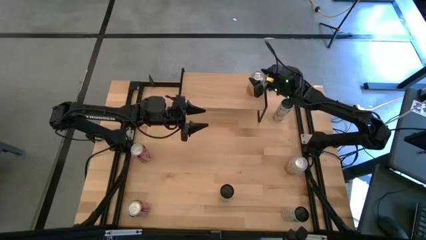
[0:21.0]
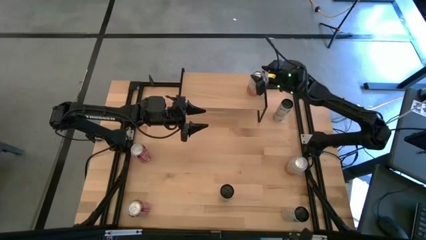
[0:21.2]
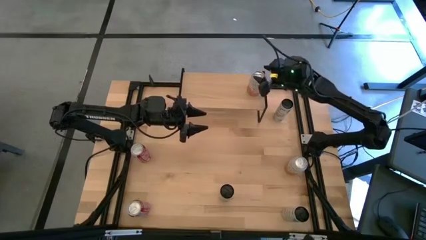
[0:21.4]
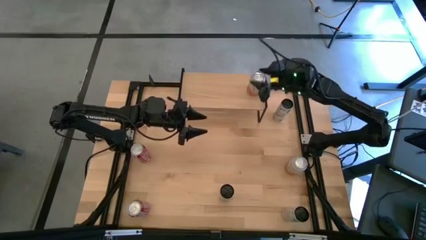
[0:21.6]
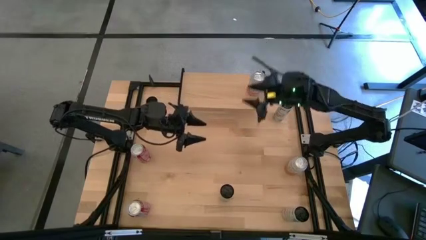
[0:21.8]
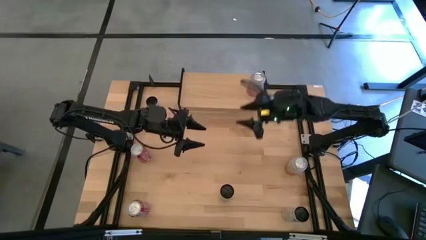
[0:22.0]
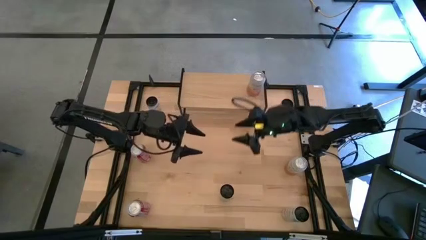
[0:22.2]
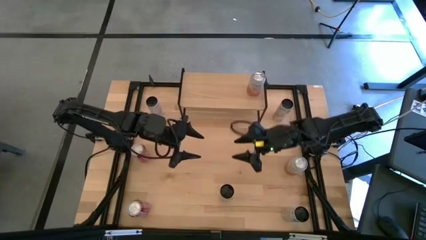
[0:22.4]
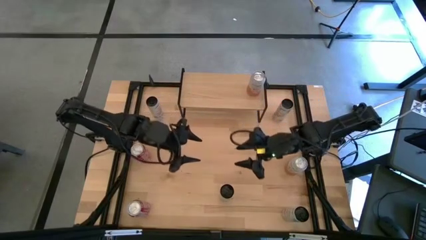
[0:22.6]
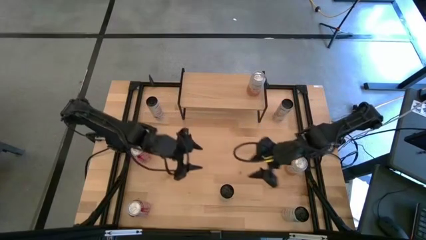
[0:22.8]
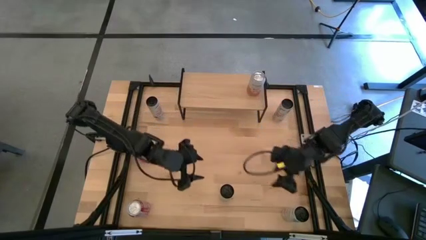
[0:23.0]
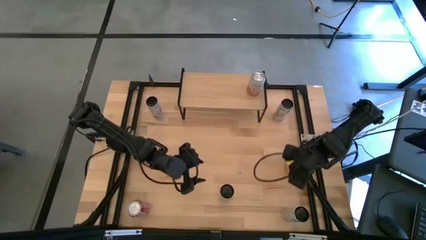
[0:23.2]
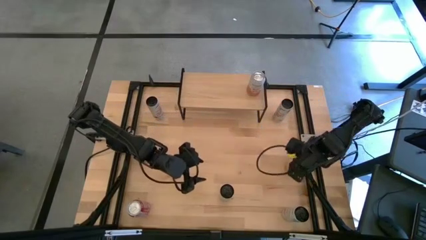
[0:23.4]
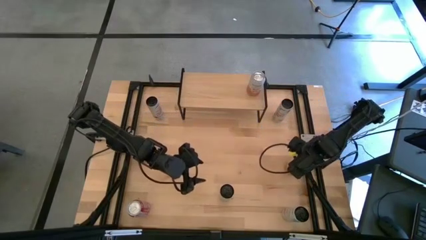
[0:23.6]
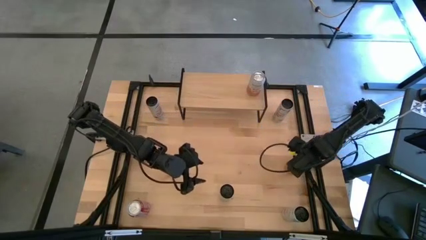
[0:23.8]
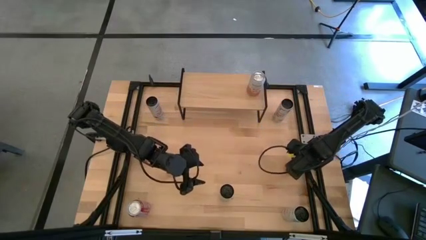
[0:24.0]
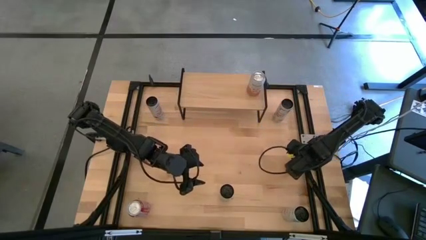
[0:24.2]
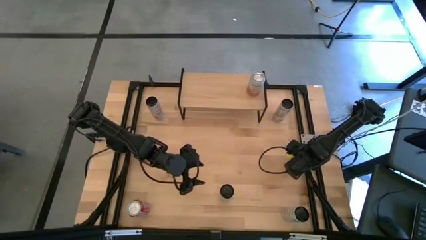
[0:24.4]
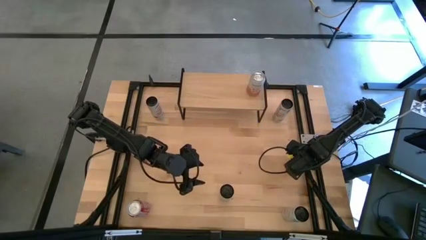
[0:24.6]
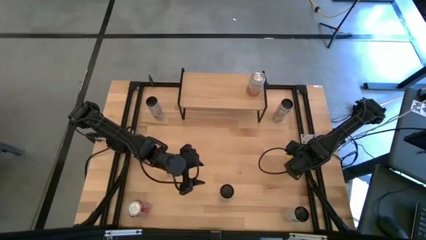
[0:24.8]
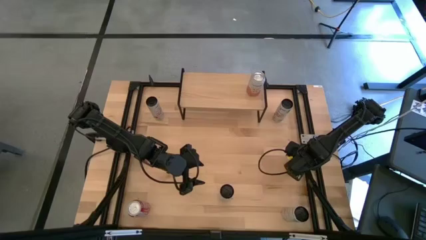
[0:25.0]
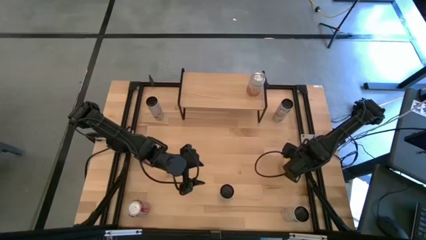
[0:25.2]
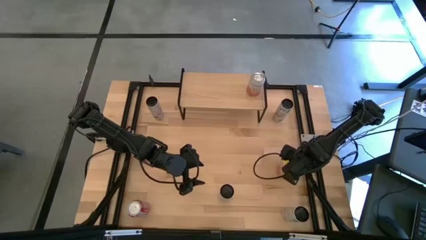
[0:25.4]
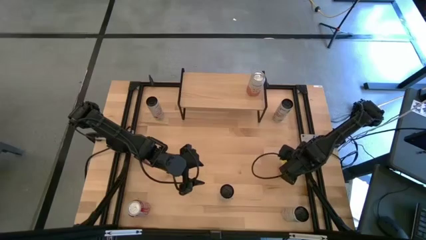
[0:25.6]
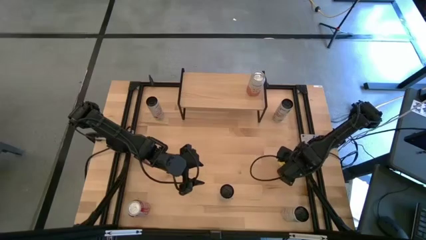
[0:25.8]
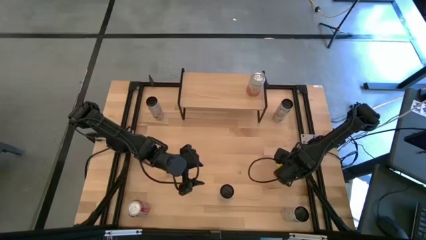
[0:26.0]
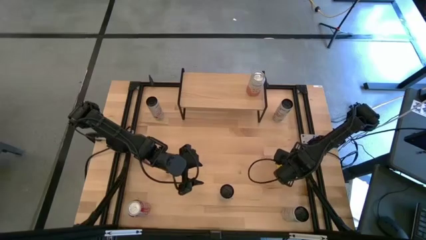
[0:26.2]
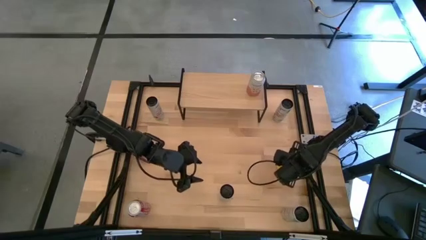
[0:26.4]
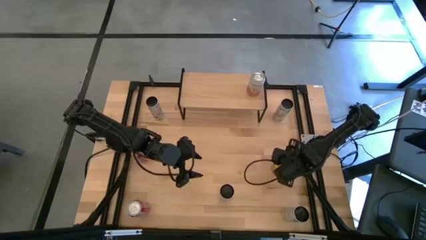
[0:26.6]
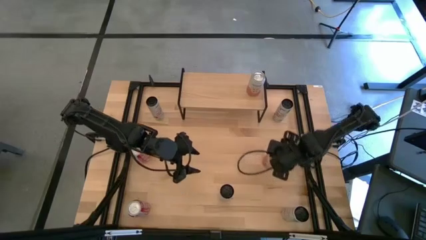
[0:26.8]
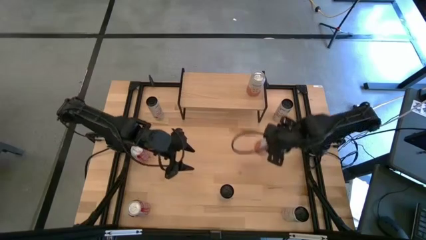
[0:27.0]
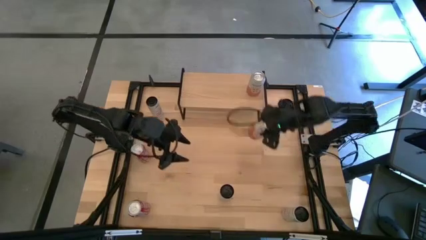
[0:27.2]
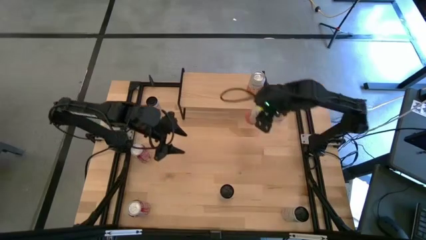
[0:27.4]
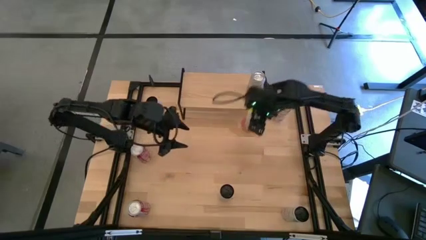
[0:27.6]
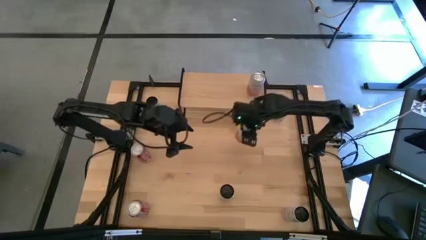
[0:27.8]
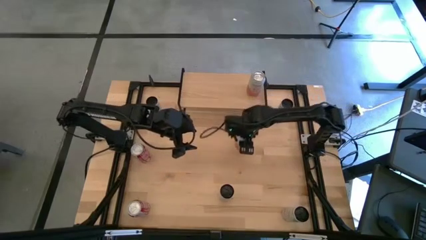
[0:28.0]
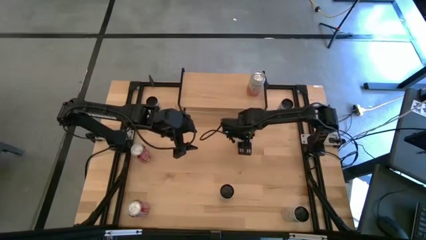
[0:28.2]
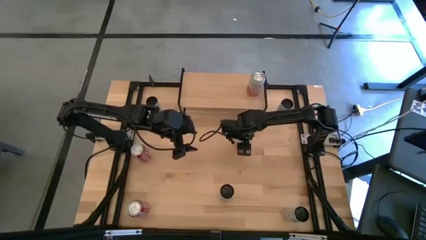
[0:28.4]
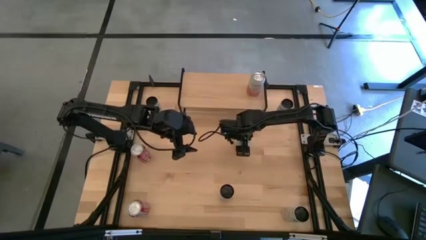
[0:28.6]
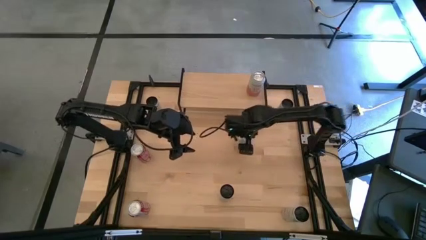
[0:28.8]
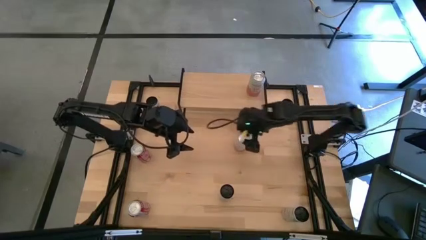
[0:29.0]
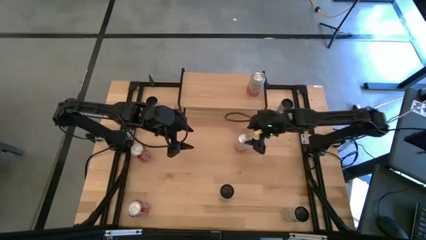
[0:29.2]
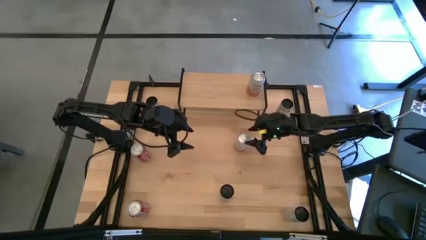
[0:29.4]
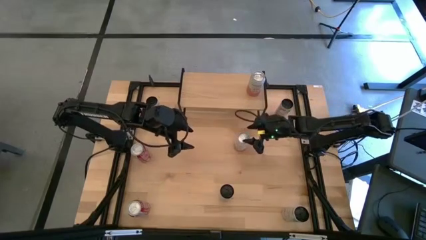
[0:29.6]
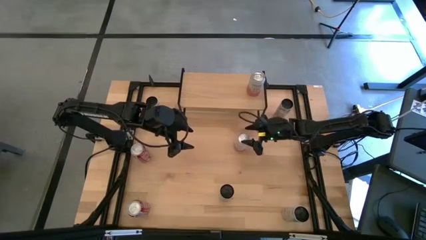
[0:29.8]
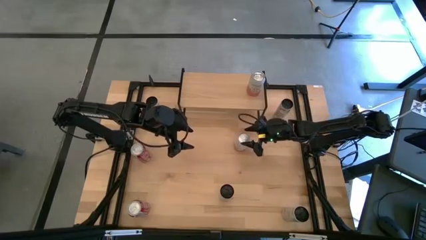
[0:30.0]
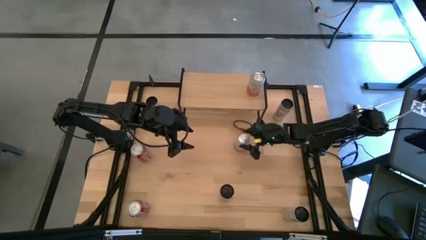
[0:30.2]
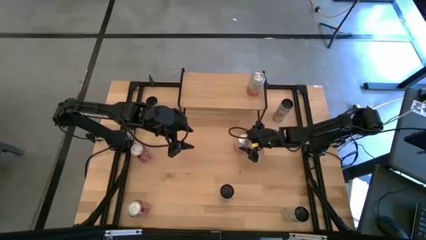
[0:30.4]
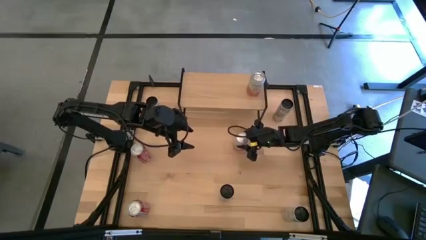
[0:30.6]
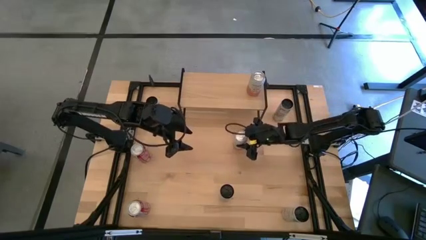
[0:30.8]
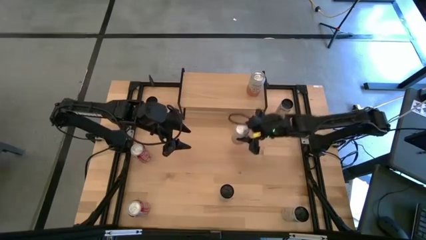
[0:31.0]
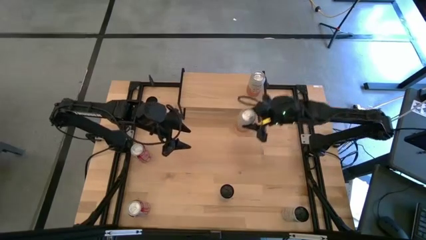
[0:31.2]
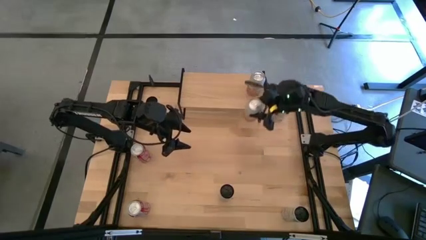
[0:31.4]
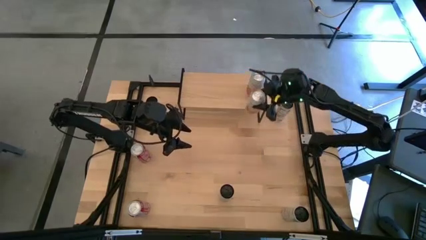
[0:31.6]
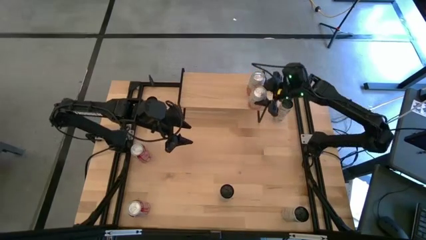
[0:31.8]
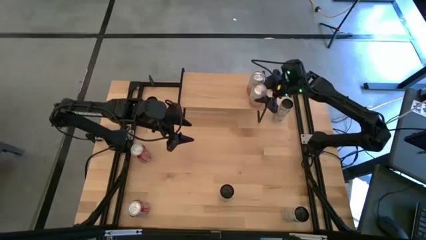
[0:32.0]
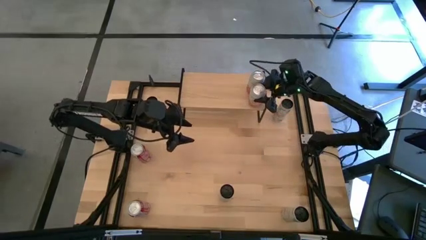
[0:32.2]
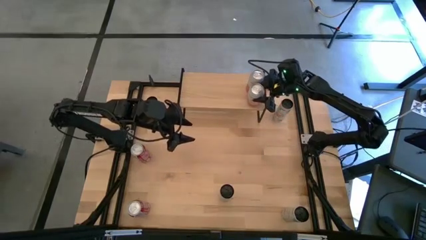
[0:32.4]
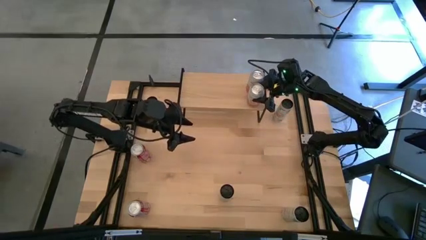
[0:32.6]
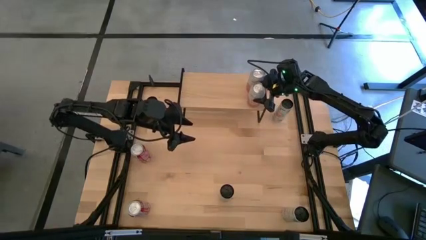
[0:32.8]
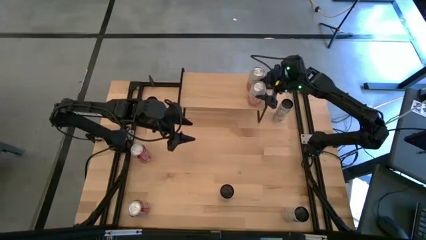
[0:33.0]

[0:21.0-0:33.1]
Task: Place canned beverage on shelf
Put the orange white soda can aligned with the other orange white soda can on the shelf

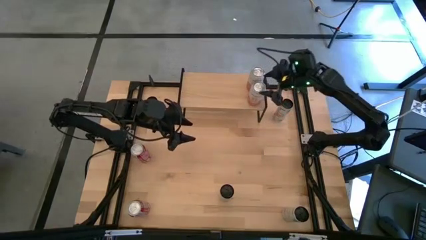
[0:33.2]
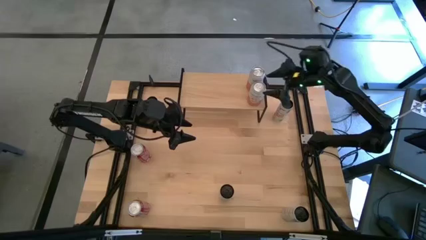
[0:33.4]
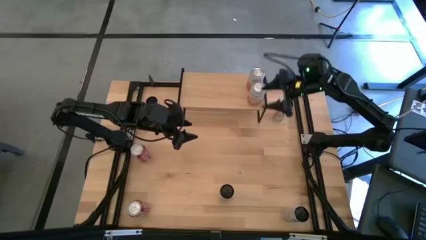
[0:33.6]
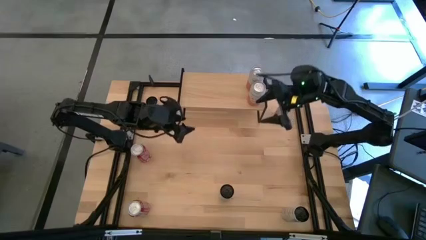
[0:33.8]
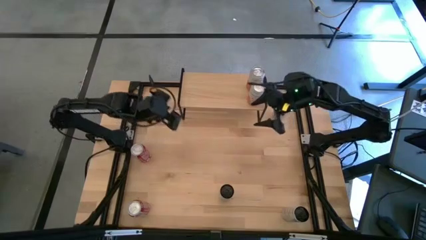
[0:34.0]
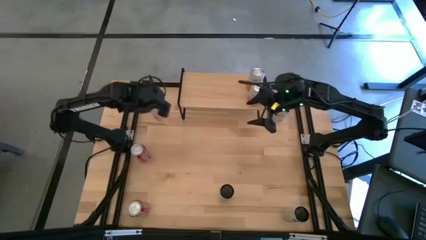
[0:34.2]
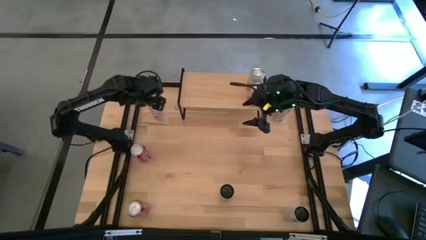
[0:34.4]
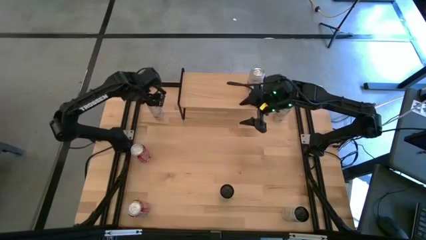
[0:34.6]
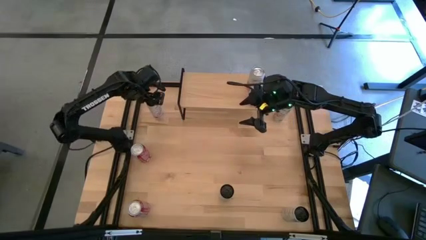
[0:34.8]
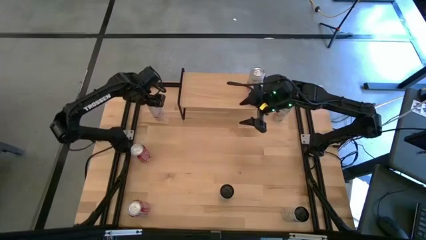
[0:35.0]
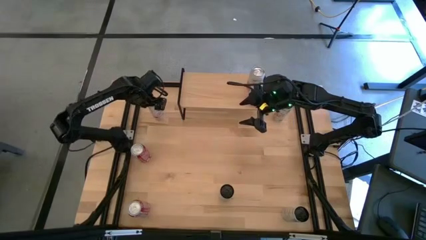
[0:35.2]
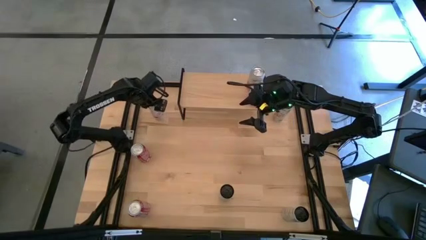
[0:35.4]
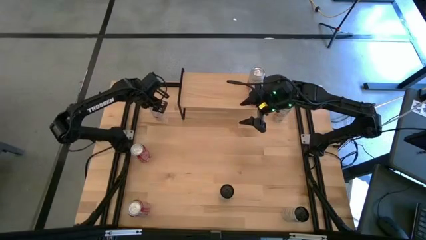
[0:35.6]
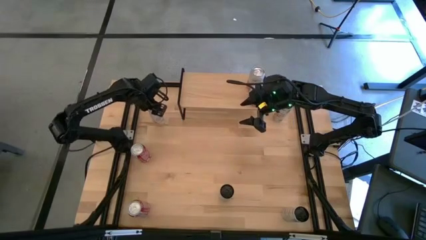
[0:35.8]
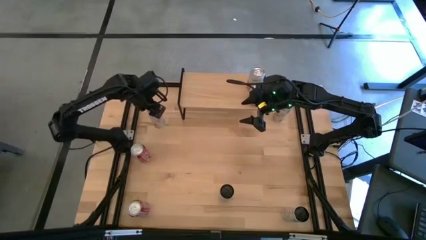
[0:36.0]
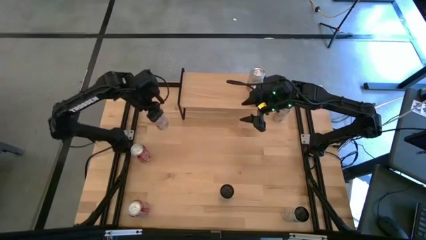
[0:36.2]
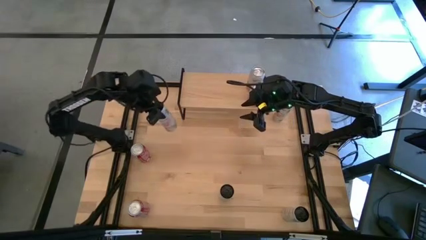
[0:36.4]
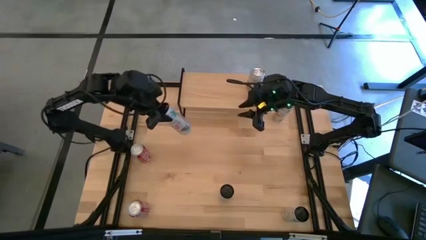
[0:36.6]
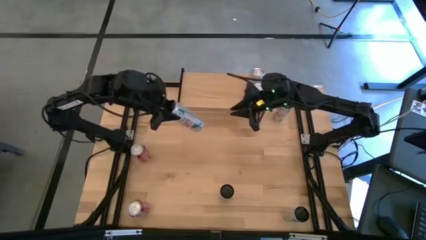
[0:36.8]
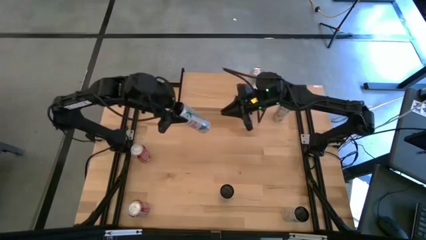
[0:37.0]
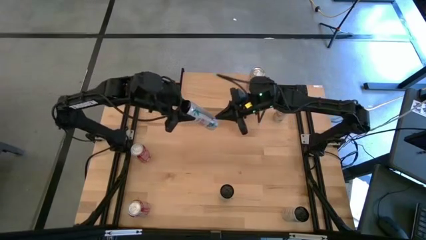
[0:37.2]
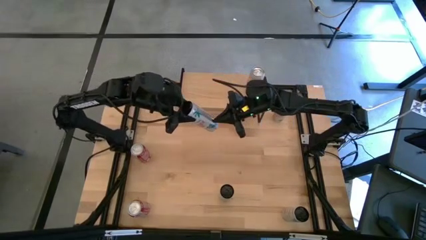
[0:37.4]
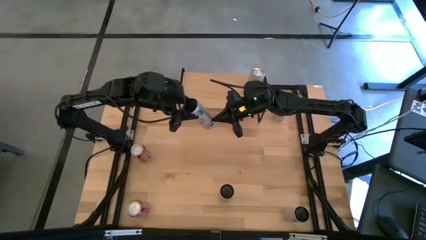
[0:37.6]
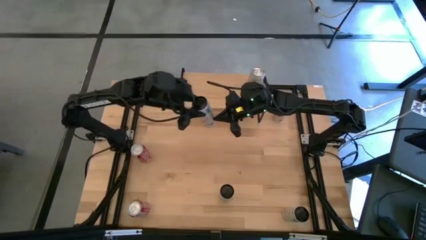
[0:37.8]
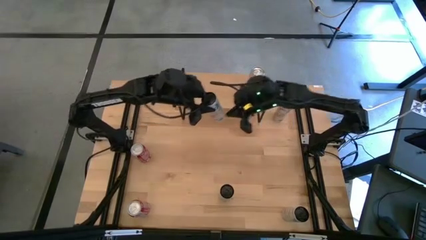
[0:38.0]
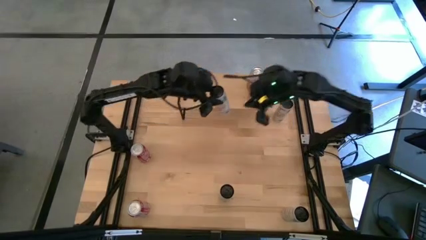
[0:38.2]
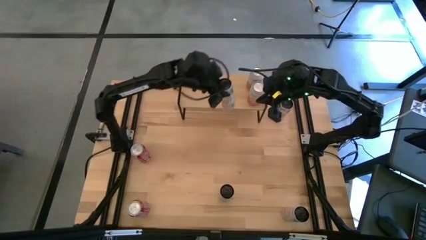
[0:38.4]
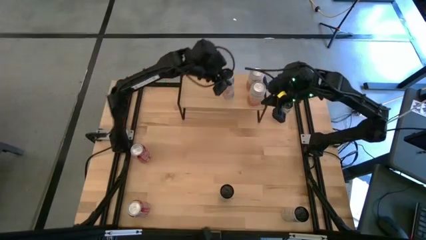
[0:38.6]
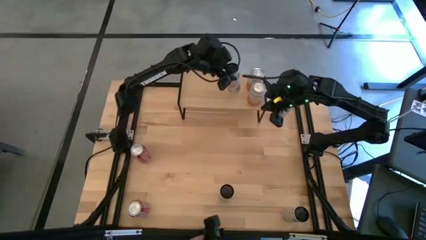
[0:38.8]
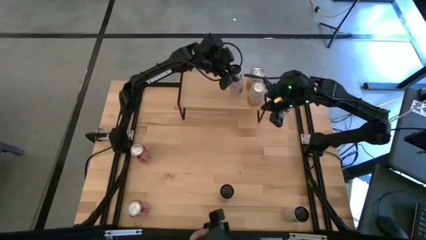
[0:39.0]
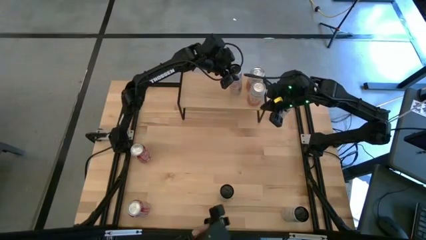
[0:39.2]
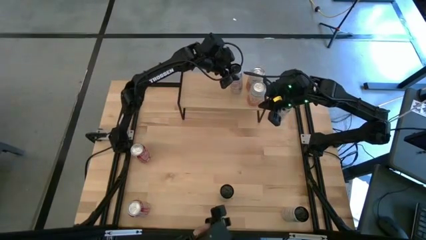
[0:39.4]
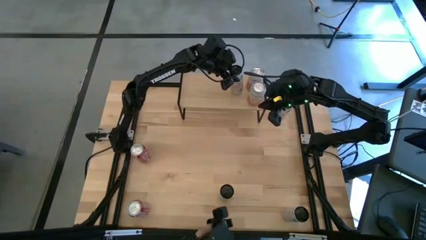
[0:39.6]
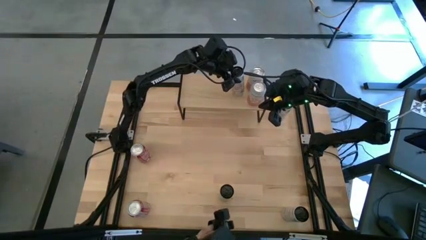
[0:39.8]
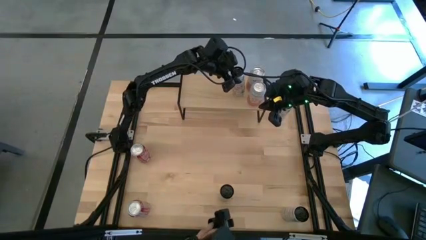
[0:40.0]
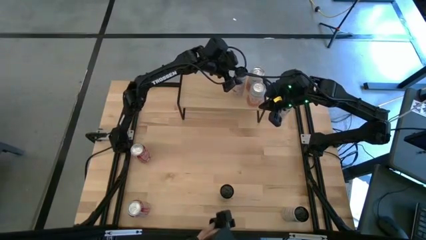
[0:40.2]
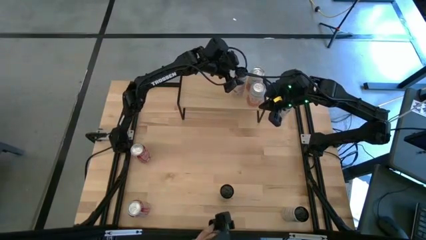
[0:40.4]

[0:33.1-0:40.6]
Put the left white pink soda can on the shelf
